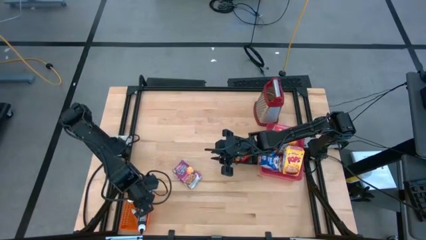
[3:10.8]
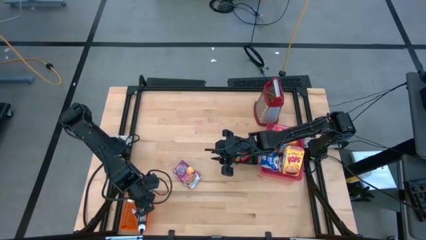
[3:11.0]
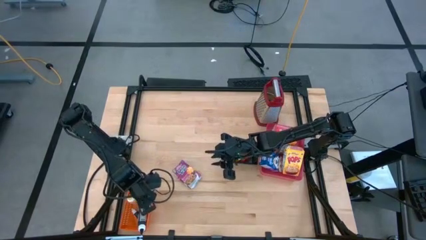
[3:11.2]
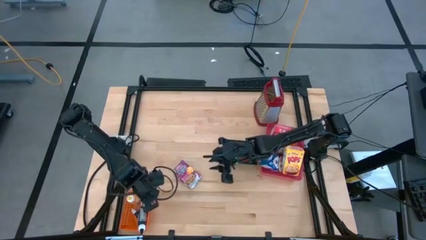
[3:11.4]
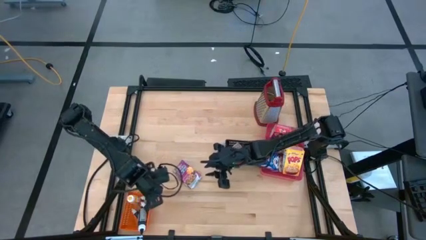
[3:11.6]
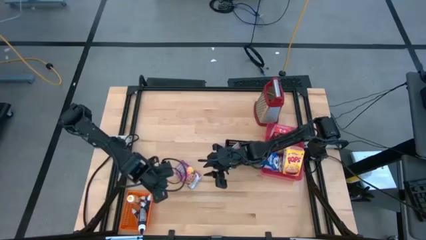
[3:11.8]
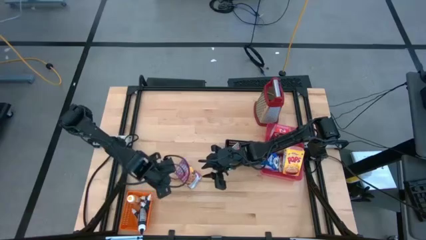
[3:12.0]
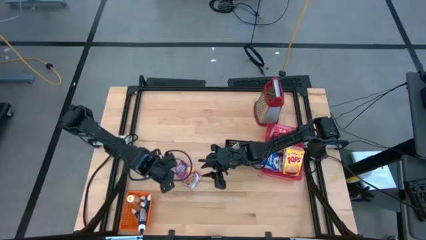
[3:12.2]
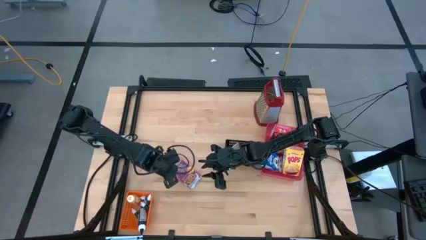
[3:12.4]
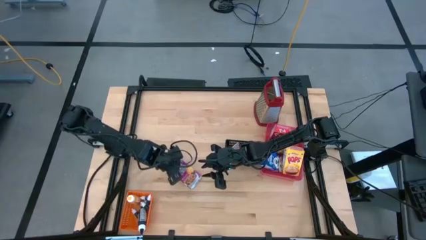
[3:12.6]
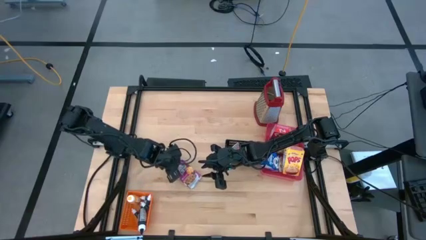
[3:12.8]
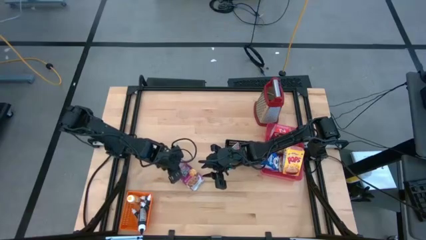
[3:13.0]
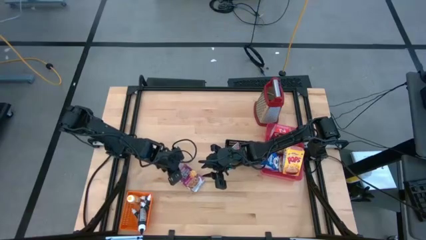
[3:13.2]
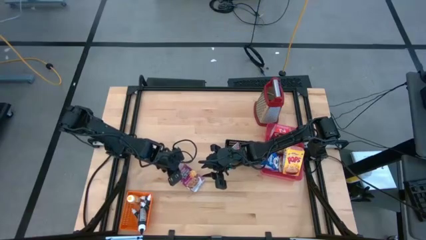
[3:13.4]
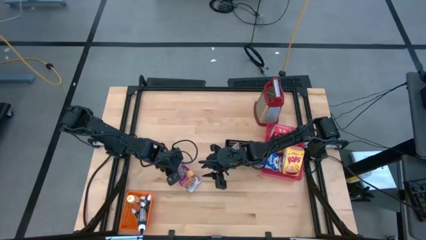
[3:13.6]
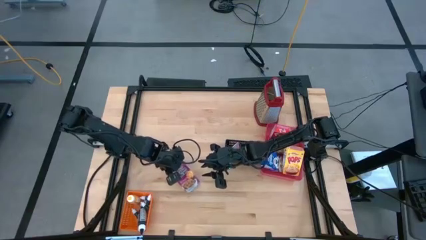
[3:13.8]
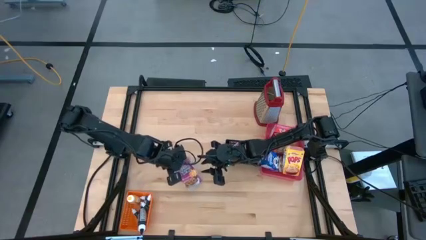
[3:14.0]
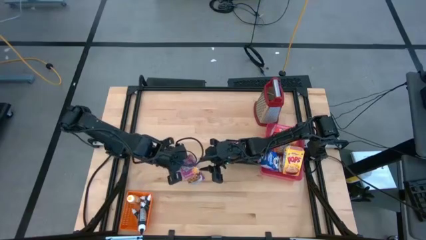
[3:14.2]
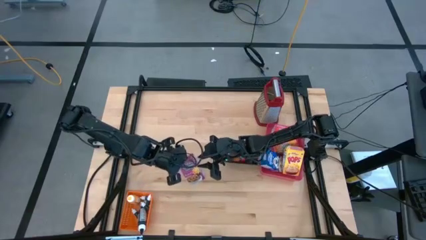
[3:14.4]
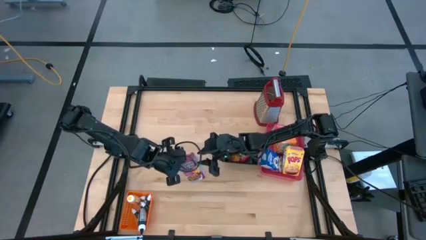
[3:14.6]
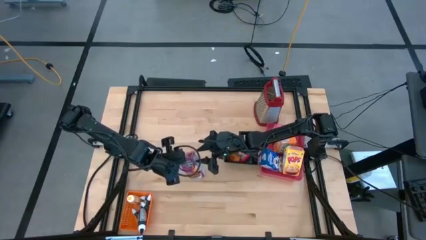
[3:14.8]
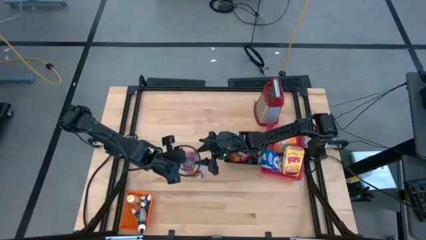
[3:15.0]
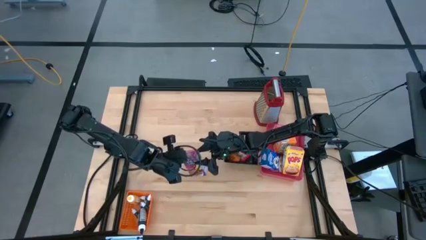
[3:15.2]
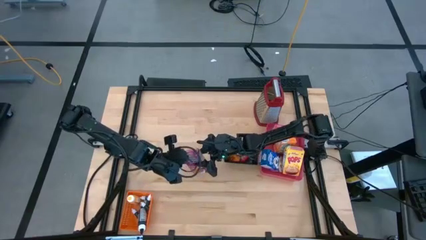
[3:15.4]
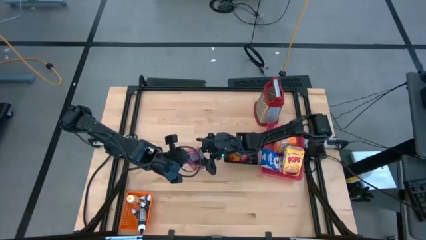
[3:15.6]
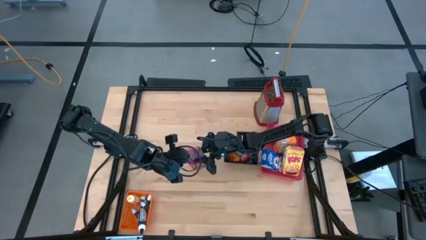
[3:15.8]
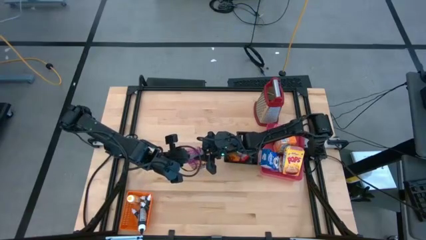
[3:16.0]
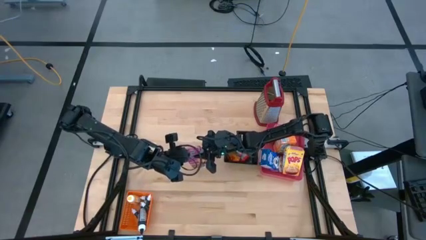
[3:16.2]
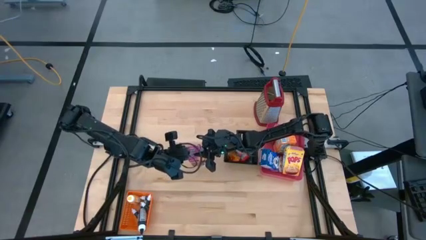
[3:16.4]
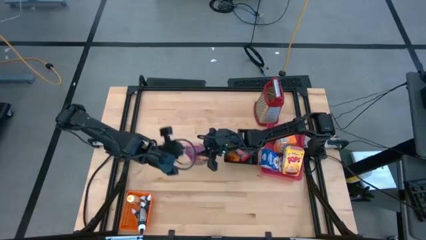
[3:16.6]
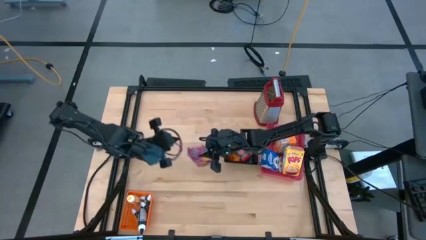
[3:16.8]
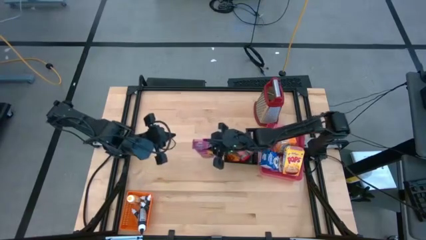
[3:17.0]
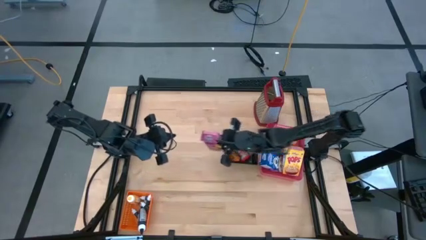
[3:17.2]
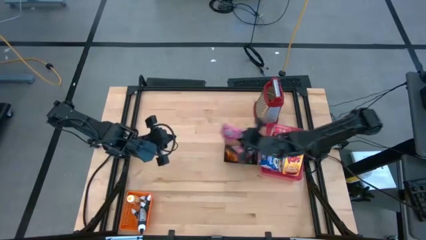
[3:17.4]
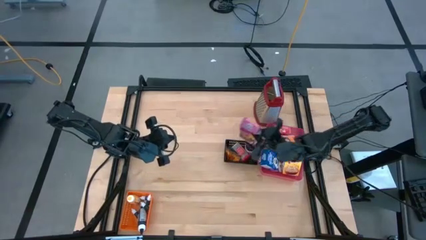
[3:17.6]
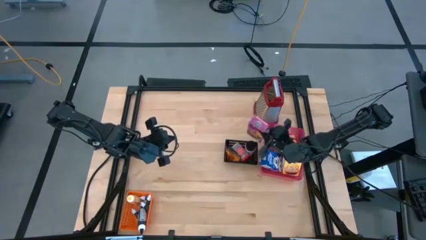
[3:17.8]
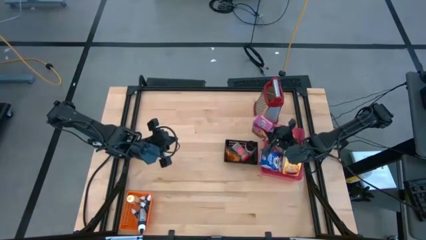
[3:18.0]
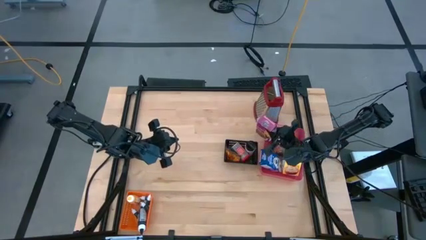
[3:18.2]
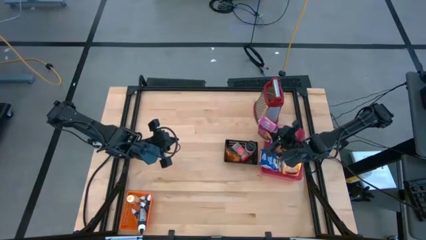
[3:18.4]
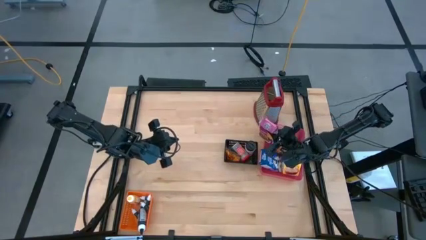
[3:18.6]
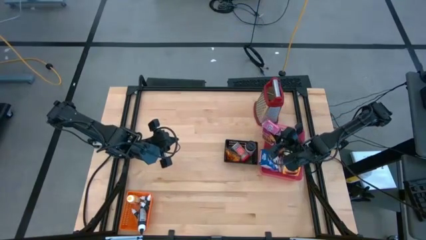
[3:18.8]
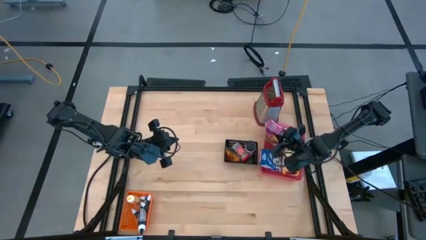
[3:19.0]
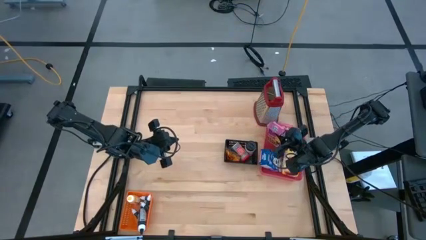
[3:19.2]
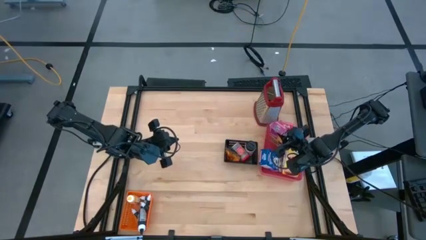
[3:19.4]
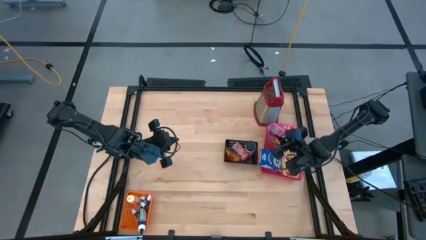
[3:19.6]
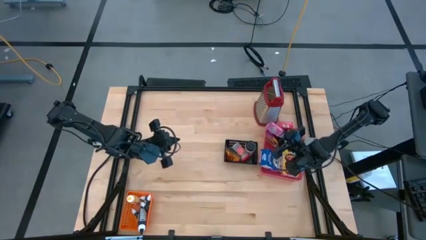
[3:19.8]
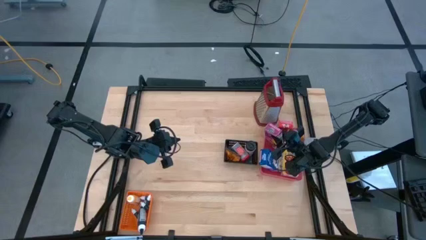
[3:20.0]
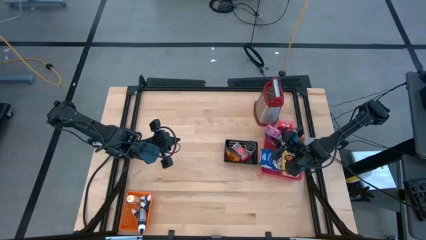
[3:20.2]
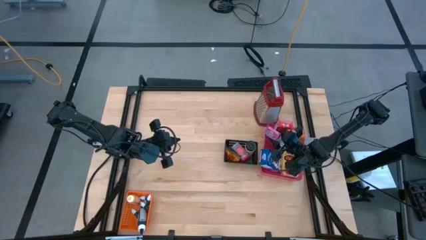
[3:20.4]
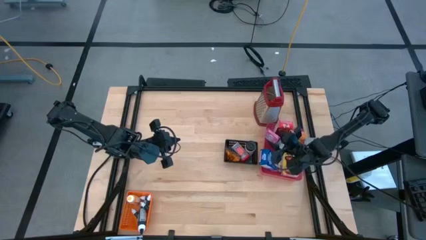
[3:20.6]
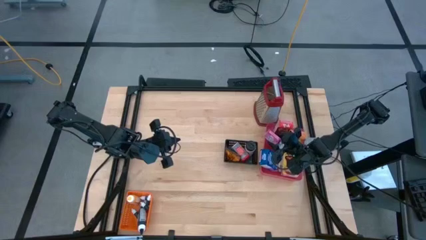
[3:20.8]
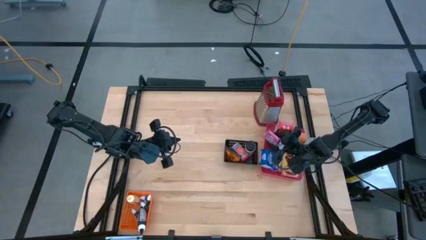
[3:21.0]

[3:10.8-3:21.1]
Task: Pick & Place Kitchen Items
Put the purple cereal box into the red bin

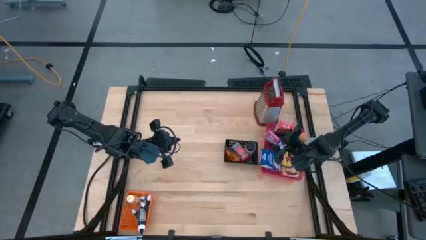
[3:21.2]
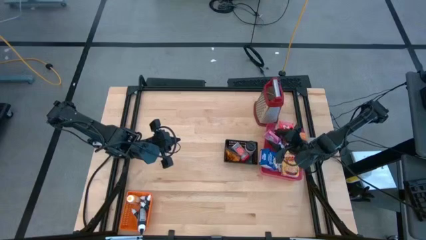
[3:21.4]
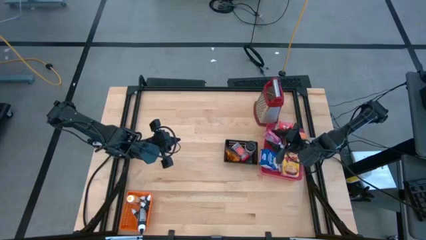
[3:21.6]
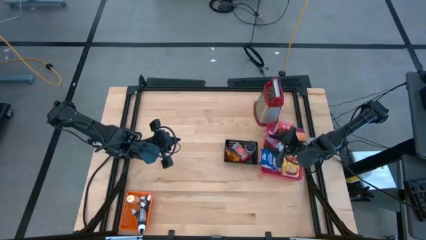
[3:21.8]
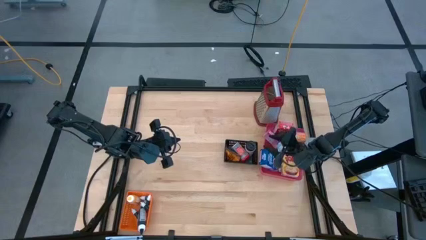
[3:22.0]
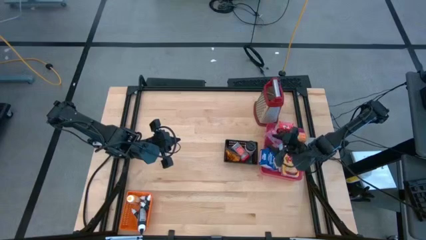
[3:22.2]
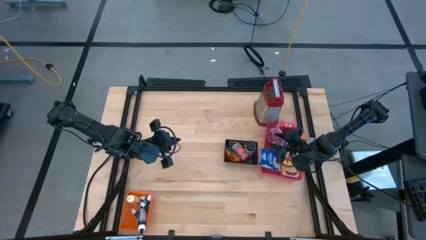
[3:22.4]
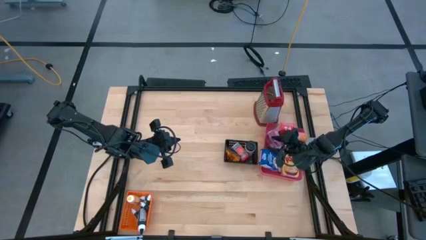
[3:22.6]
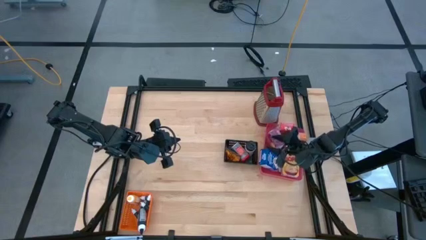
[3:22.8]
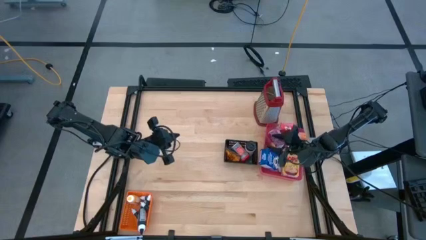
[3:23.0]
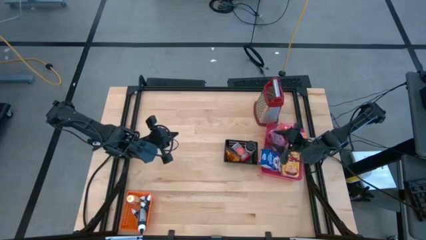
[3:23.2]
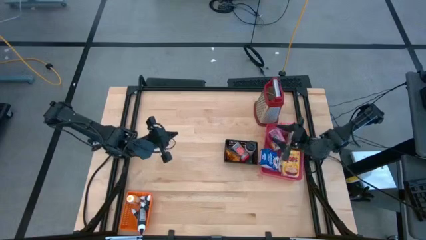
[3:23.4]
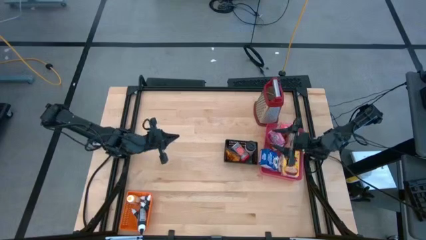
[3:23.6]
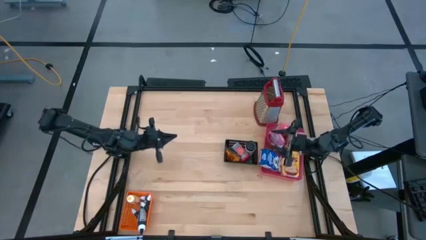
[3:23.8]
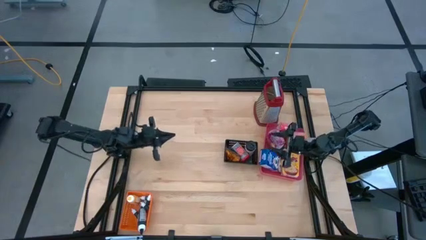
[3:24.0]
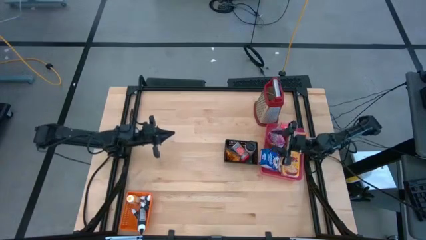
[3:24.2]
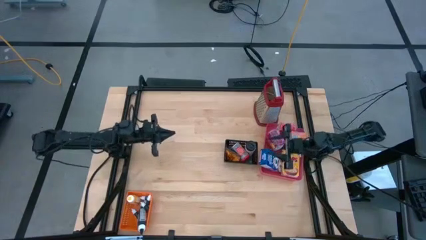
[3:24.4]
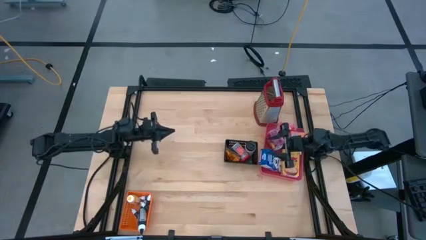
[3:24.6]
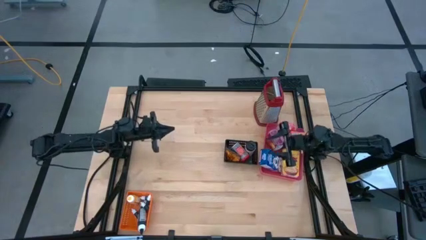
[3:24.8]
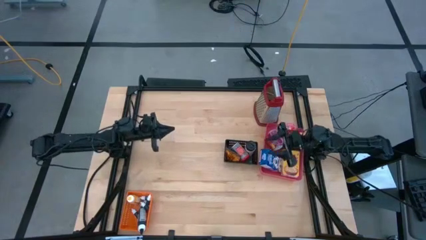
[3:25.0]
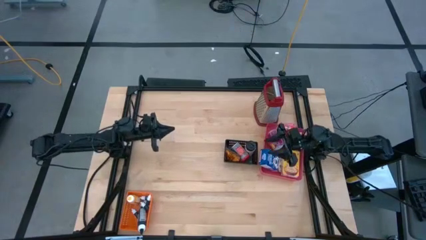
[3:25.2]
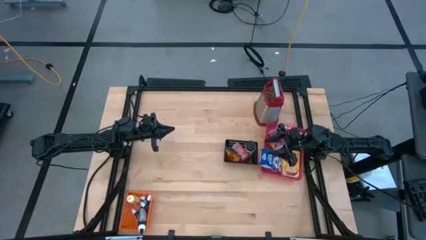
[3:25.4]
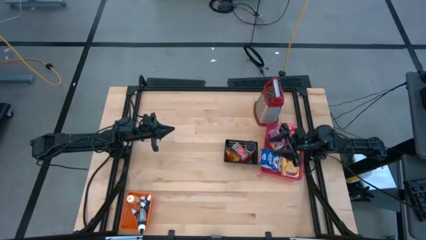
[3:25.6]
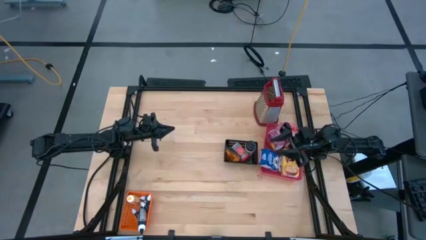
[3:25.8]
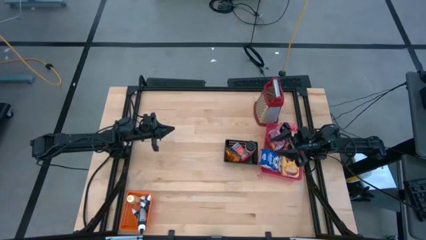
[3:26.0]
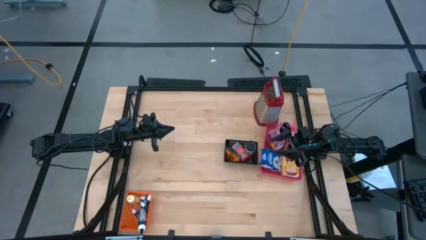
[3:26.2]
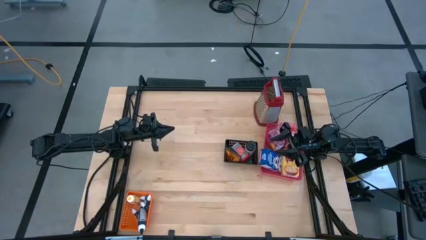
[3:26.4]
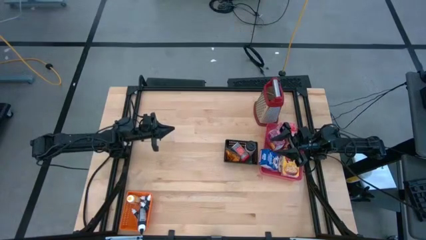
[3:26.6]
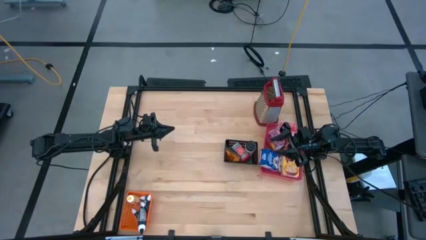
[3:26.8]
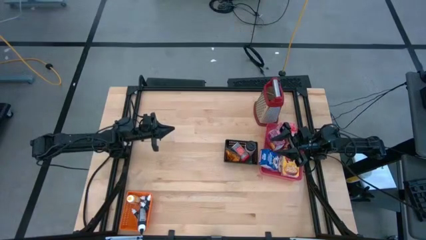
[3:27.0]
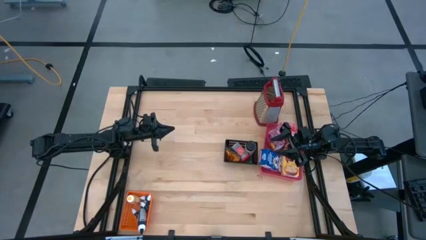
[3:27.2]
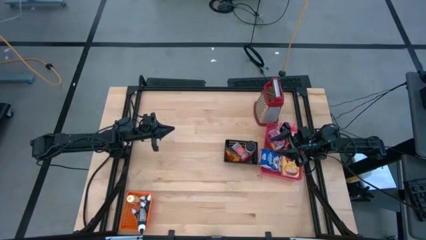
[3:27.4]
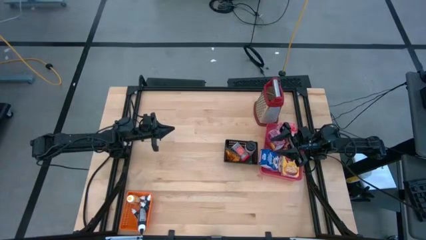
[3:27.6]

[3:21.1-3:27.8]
Return to Home Position
